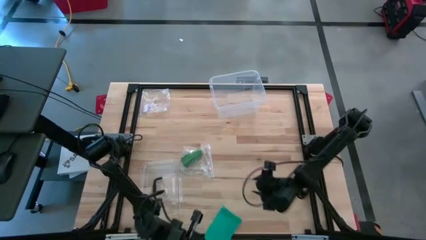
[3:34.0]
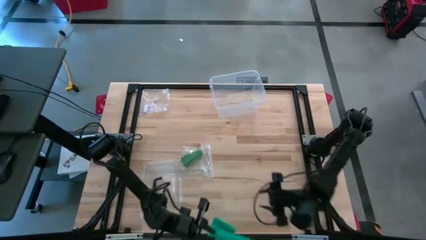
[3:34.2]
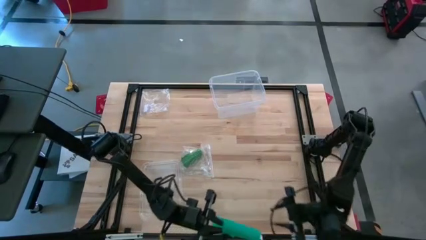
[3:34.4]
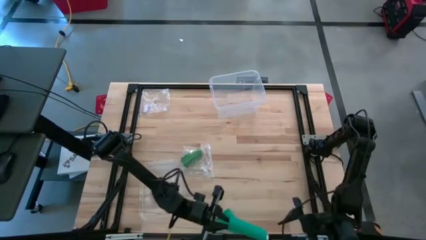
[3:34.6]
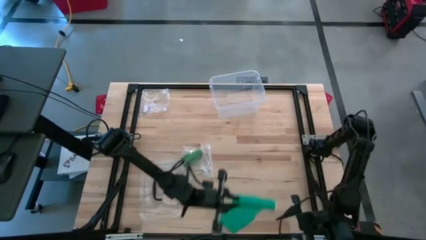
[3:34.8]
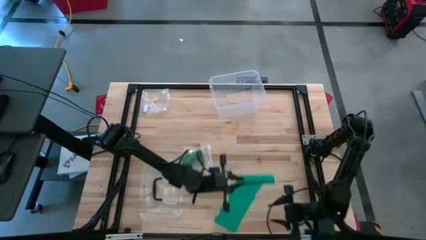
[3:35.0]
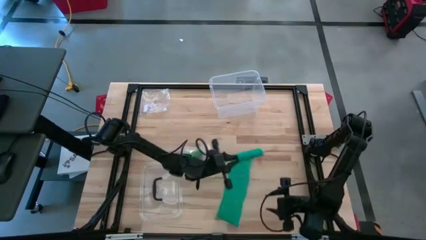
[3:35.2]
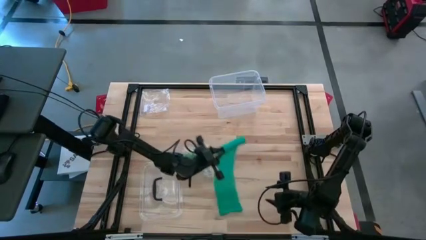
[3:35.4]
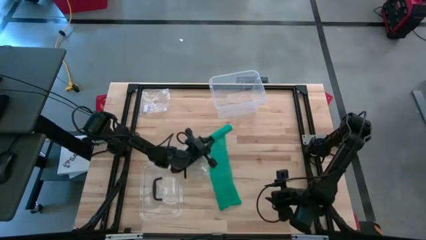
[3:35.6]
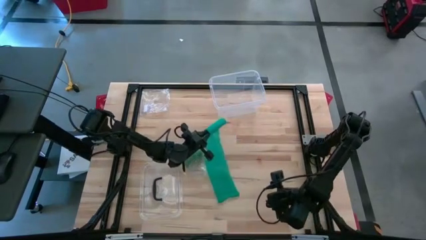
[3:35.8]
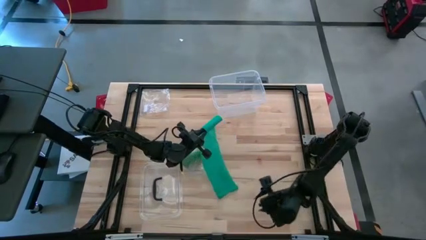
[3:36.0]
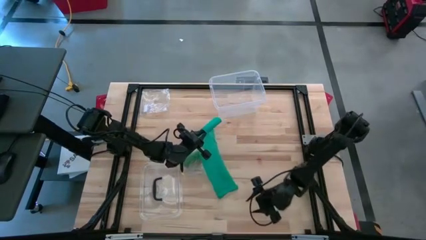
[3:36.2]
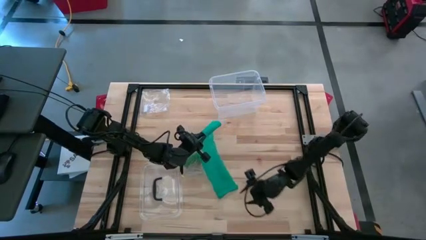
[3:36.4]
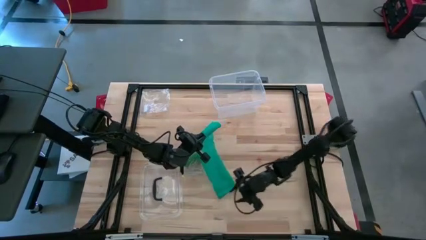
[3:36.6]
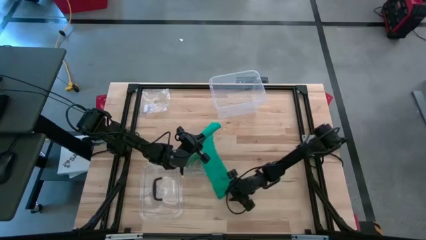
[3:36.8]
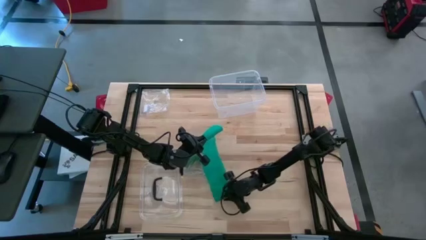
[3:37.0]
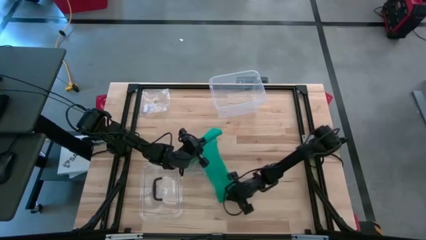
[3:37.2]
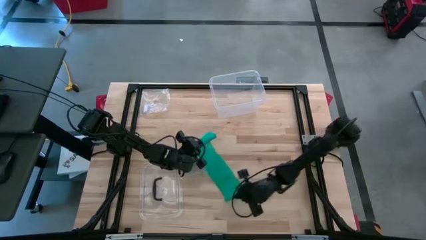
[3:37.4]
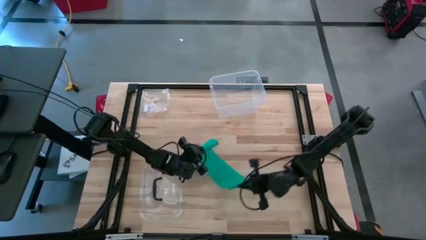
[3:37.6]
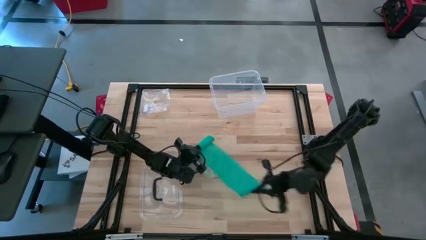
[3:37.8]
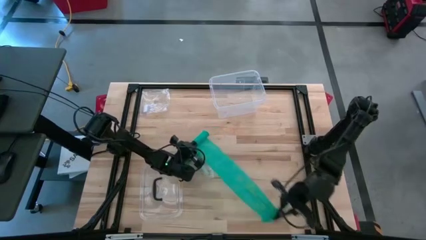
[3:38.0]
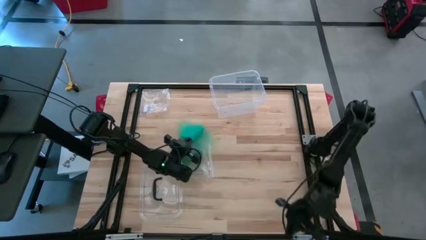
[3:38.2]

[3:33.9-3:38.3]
Task: Roll bandage
Roll the blue bandage

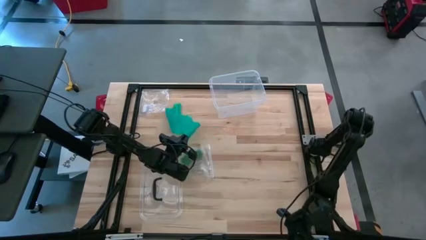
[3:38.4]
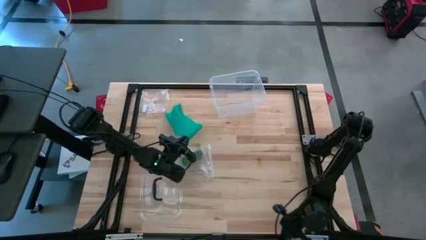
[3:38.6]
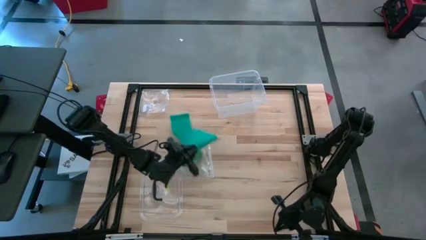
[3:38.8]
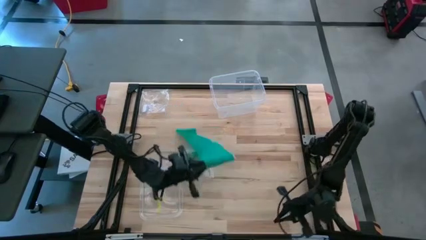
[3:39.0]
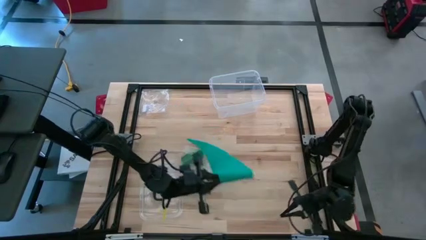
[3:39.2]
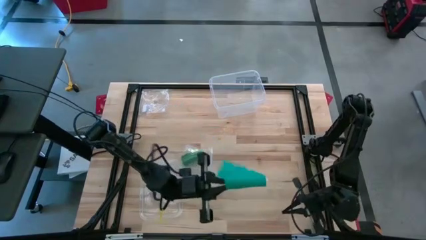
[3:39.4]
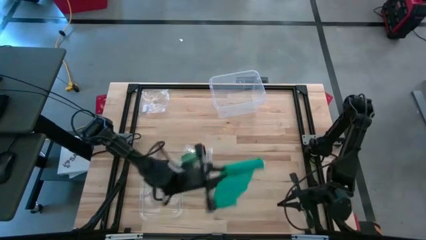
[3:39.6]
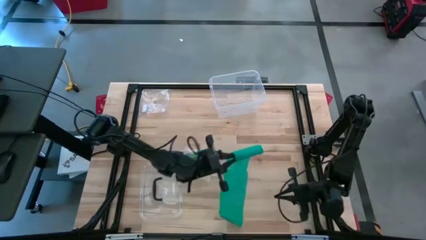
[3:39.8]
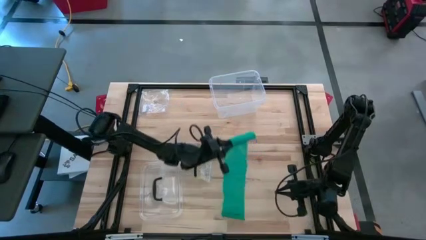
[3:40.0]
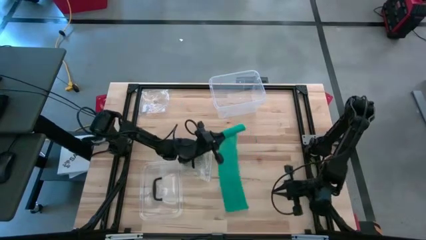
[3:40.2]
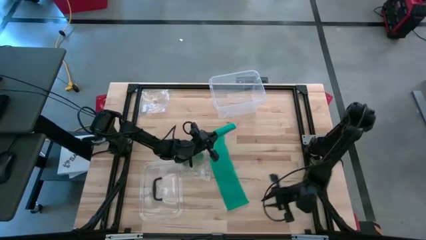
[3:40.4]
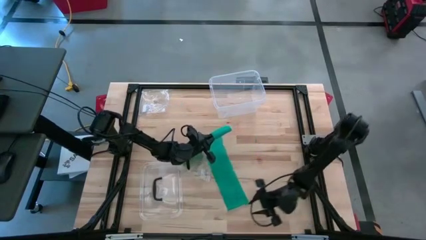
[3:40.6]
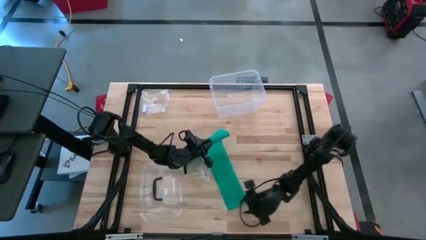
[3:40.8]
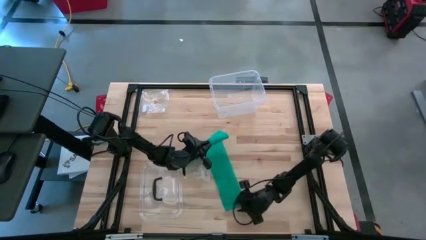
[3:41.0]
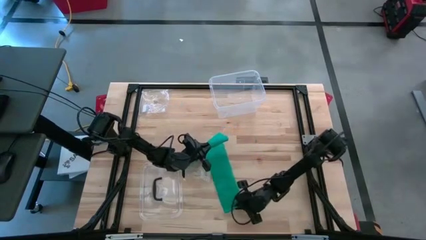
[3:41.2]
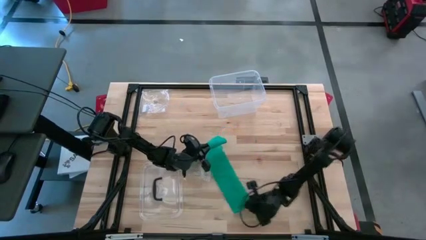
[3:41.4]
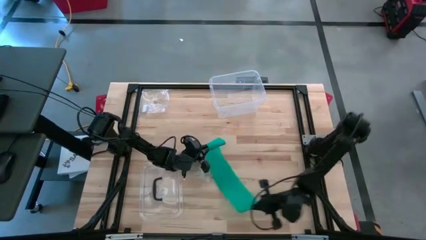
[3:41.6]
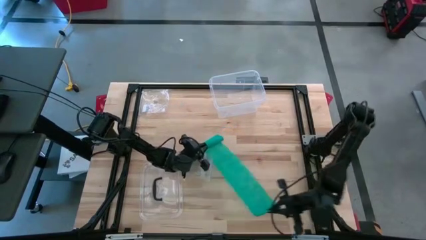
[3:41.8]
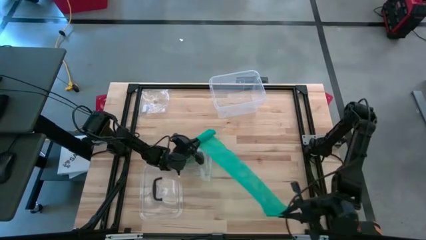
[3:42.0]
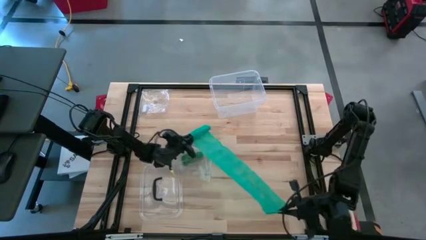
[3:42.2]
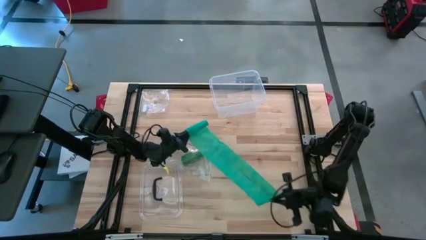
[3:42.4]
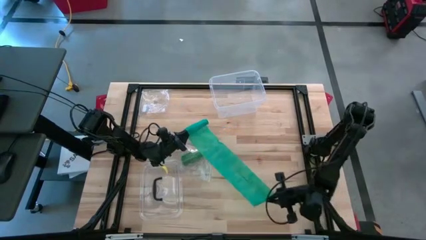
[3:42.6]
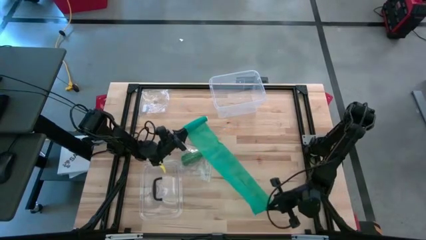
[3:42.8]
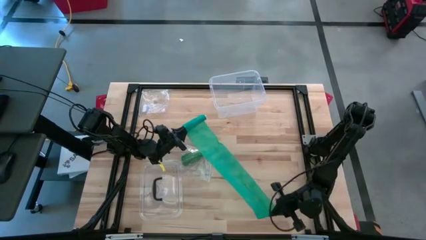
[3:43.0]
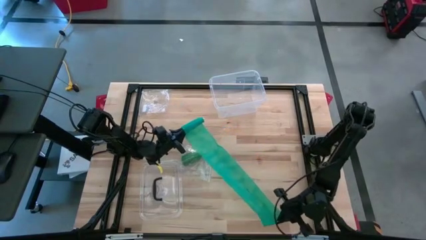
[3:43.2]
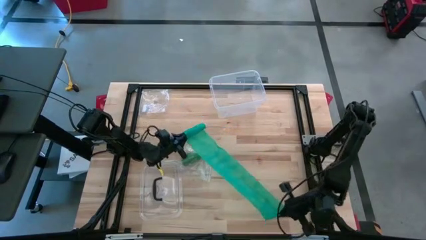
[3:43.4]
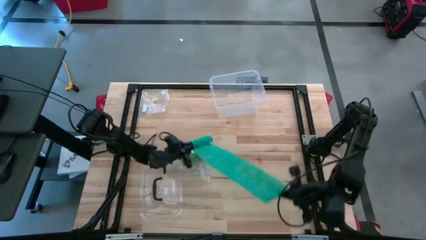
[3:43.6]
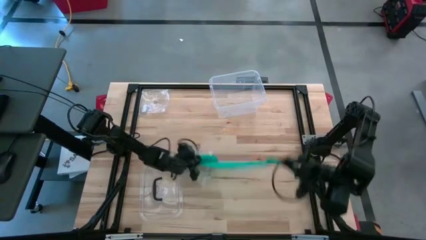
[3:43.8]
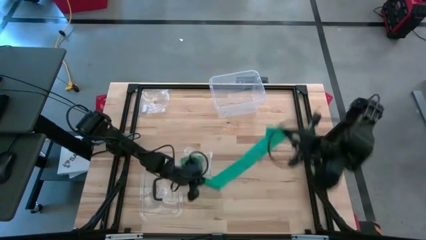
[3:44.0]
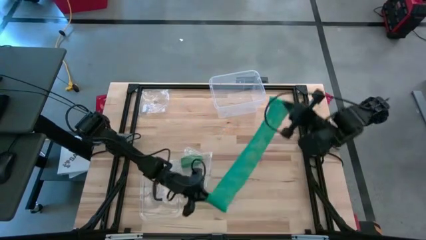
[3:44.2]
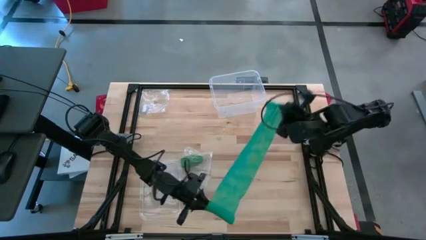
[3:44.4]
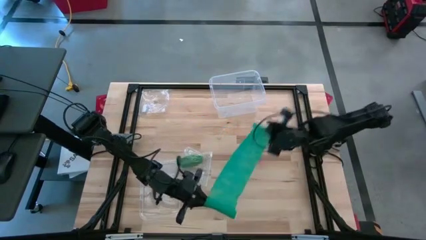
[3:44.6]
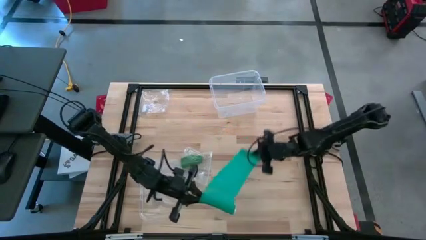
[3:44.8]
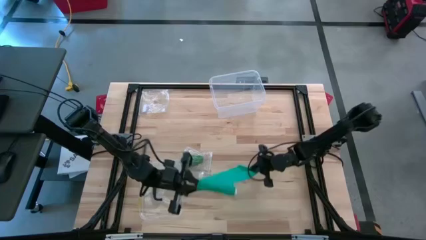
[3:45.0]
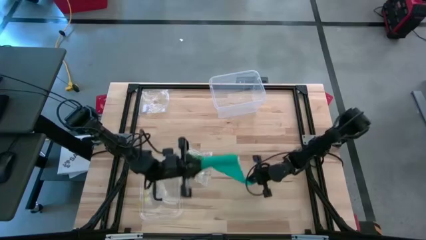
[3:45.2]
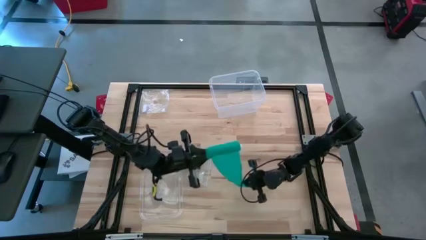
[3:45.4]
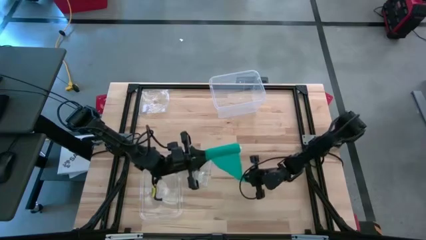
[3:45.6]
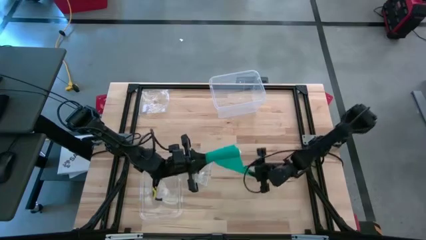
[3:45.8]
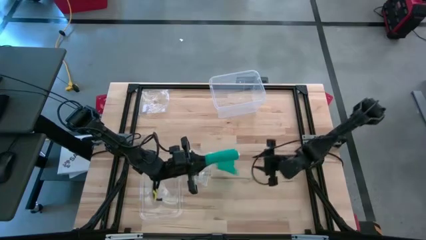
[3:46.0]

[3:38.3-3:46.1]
Roll the blue bandage

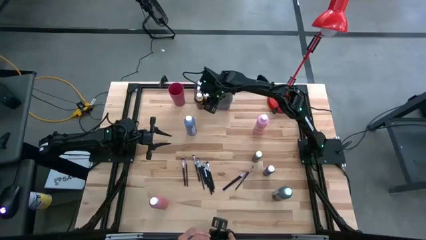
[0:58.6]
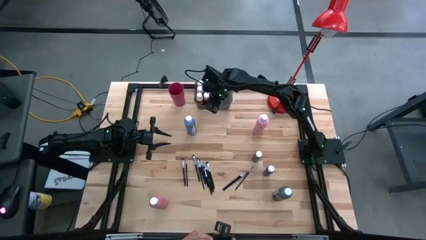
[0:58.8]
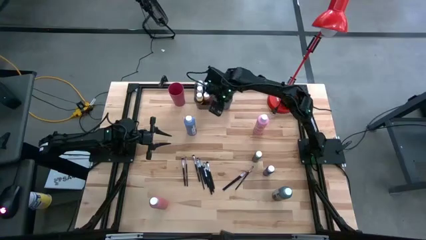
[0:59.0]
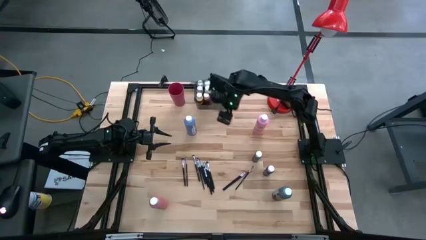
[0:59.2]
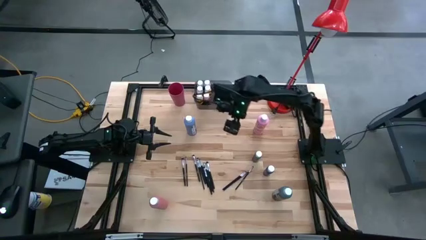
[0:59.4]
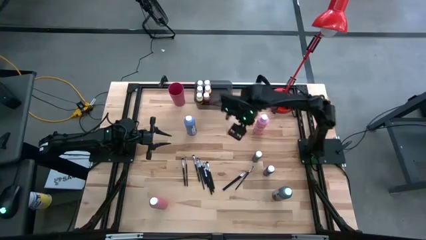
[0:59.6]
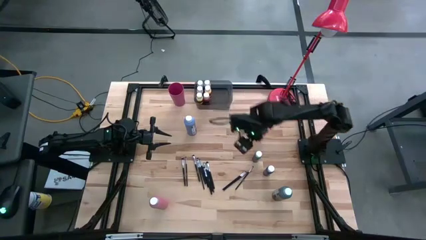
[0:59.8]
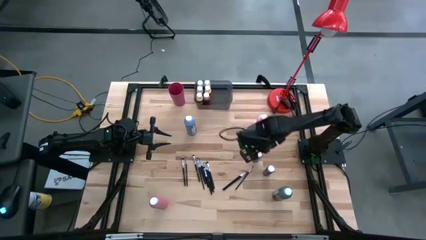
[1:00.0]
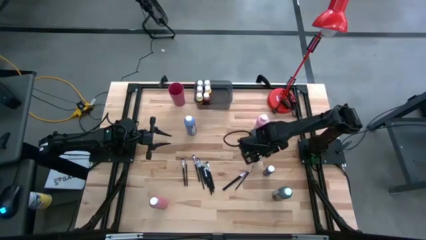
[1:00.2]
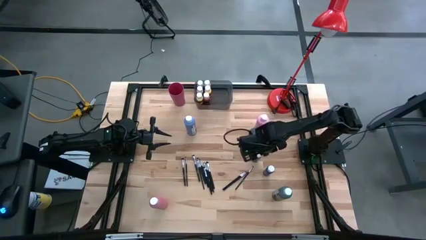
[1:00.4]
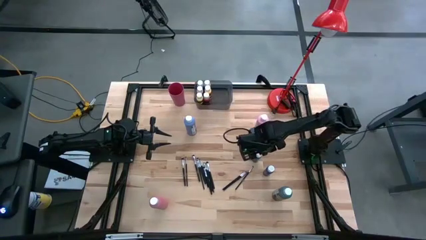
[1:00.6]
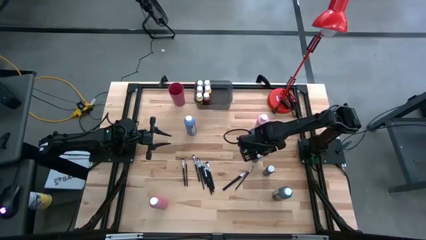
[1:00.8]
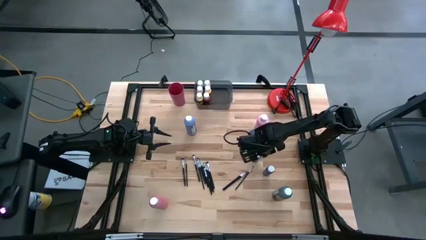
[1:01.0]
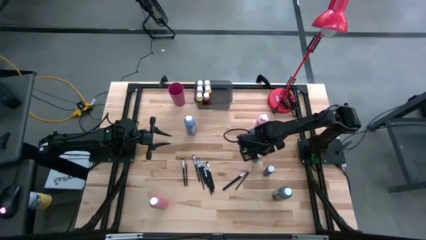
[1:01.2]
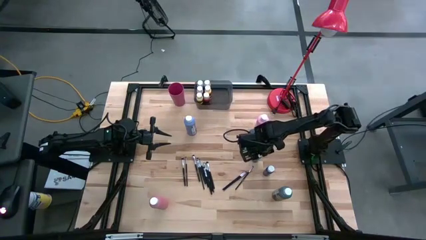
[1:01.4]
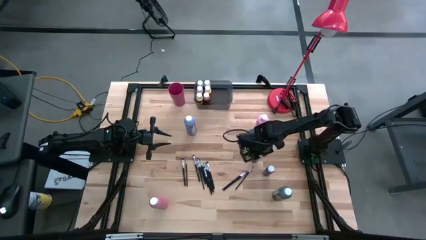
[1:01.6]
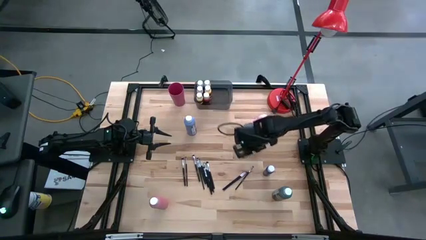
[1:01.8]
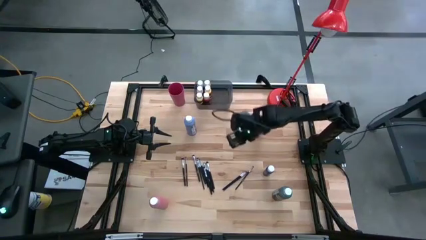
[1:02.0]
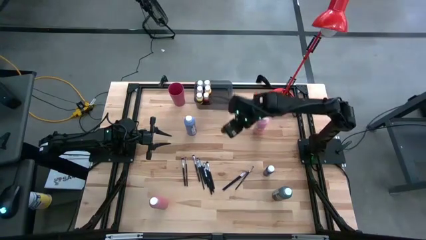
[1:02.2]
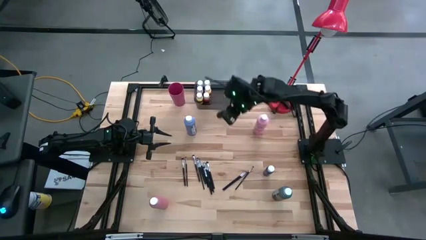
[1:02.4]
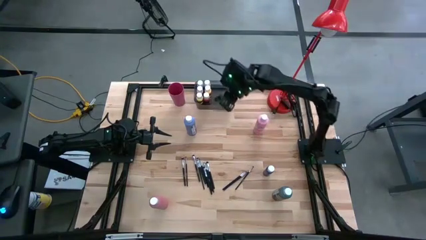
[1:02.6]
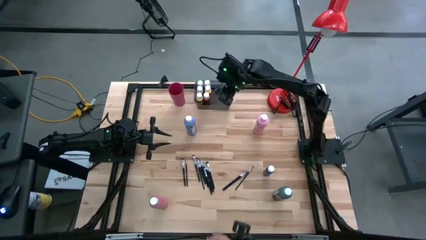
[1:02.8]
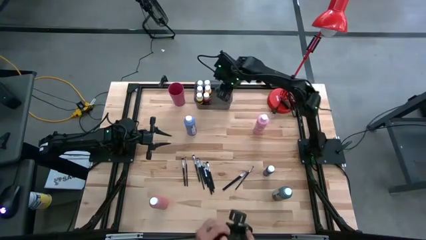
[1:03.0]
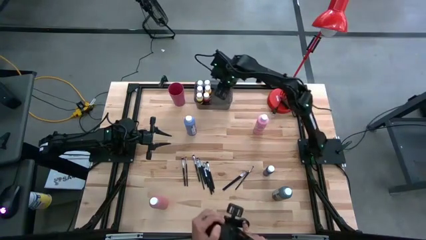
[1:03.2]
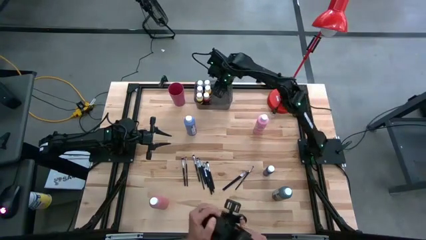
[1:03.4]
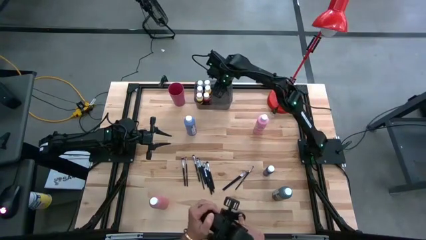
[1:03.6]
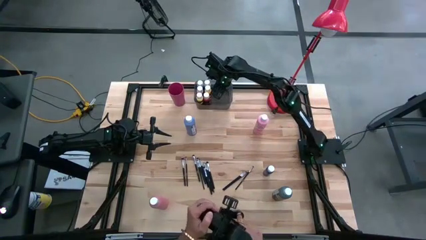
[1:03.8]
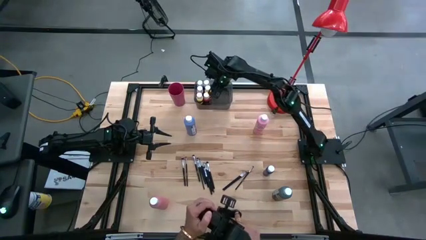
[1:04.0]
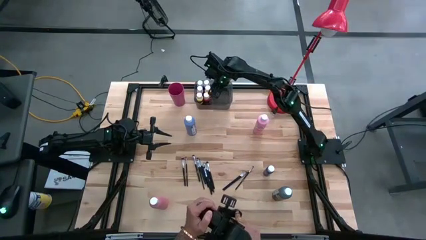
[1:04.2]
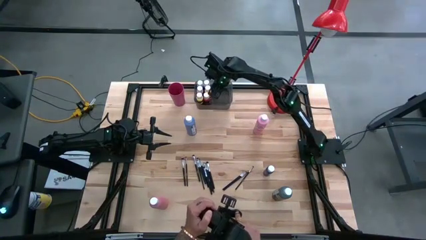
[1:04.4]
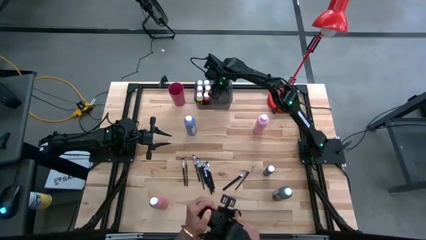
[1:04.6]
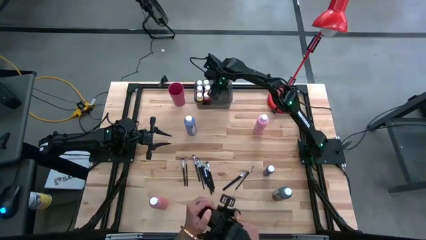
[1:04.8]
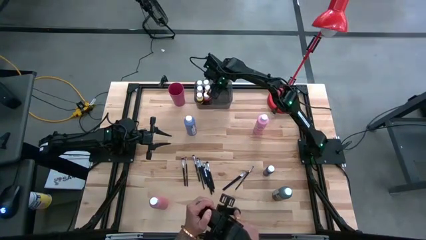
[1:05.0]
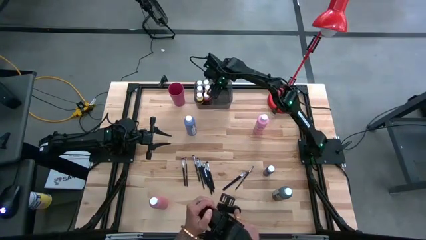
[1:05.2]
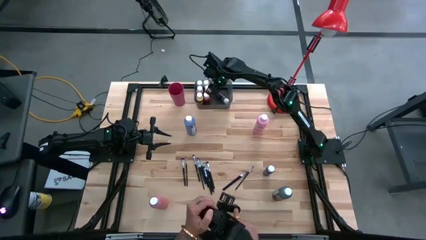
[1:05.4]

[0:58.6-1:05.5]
Task: Pick & Place Paint Supplies
Put the green paint bottle into the black bin
